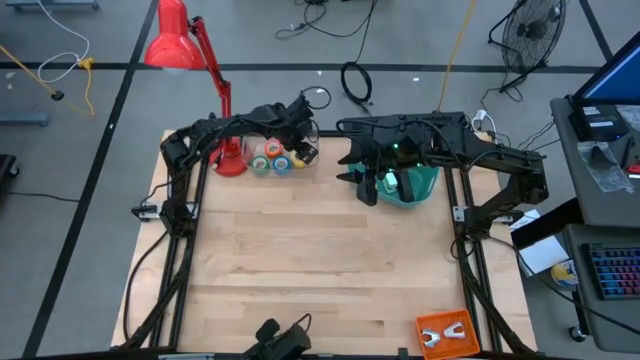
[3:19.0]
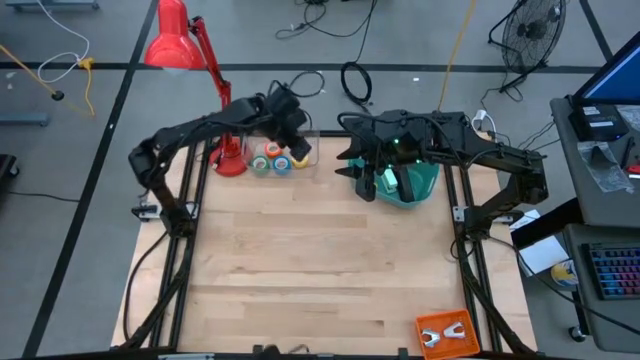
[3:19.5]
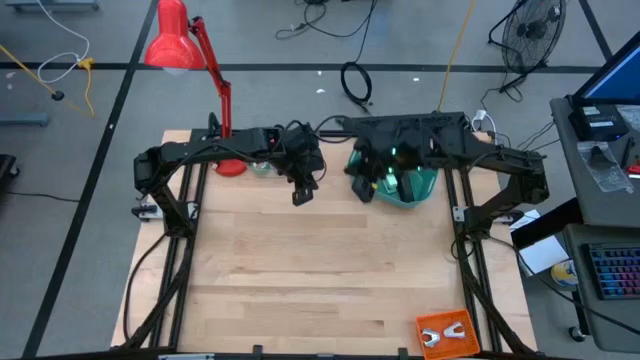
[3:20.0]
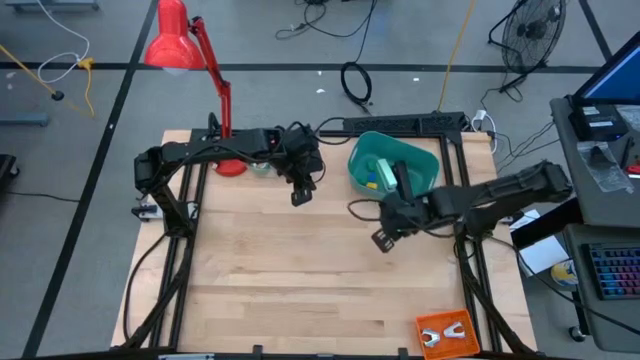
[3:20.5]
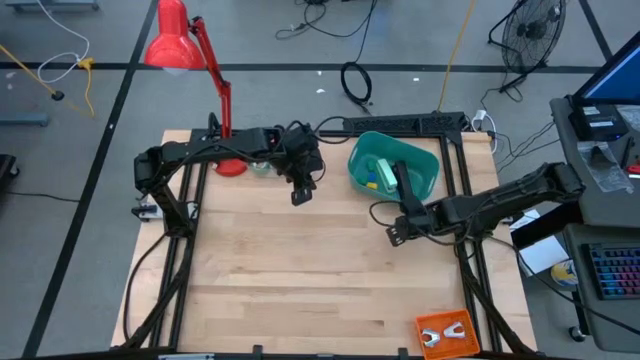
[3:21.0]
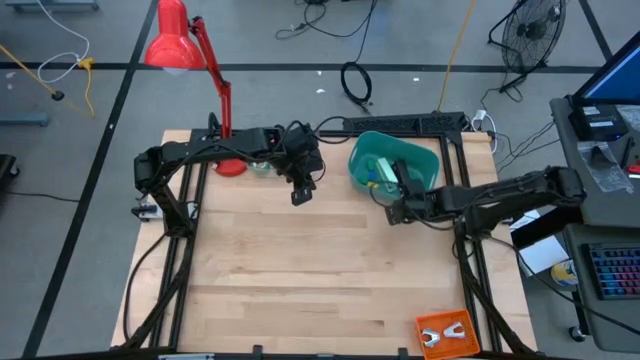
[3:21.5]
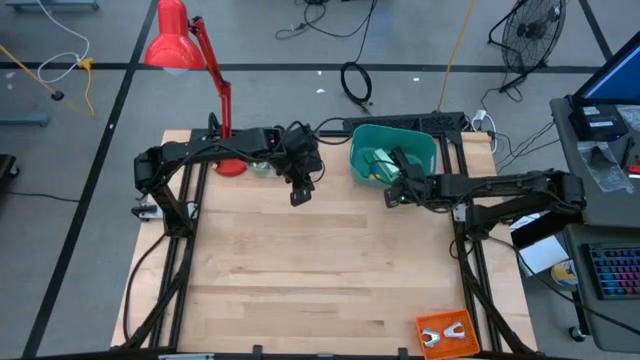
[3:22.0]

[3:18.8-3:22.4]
Task: Pick and place Stapler, Stapler remover, tape
Adjust the green bin

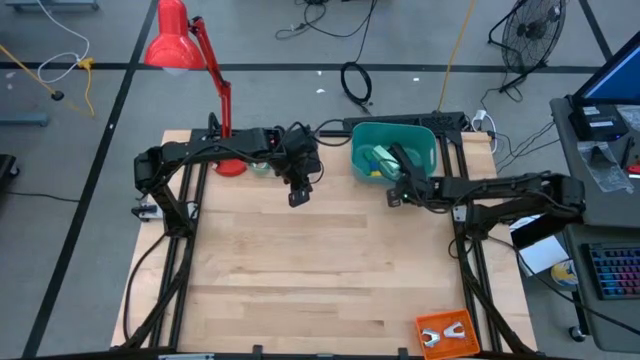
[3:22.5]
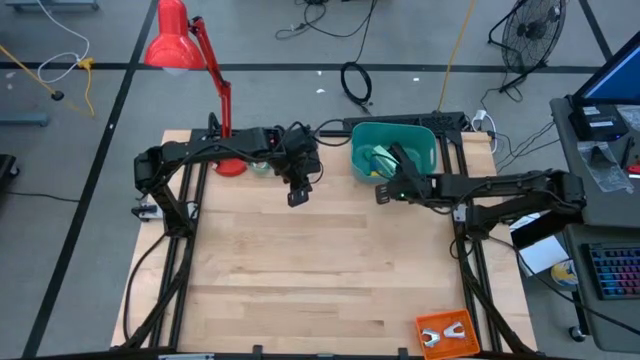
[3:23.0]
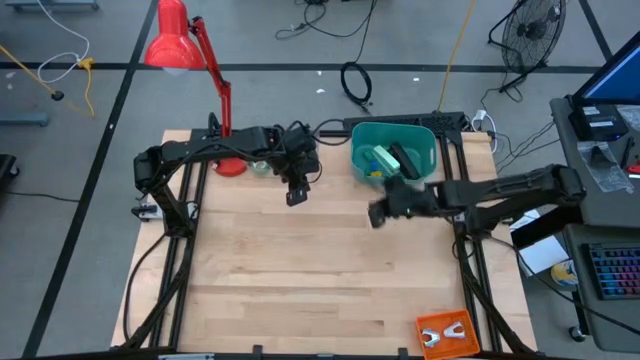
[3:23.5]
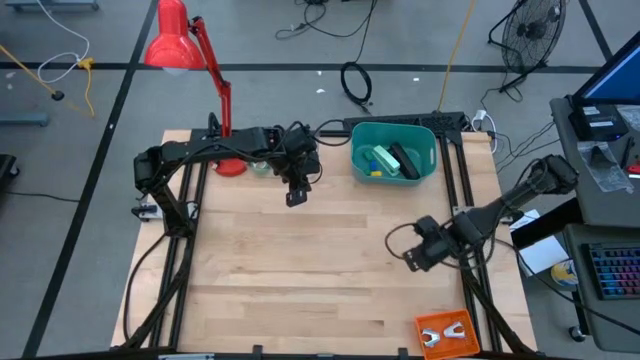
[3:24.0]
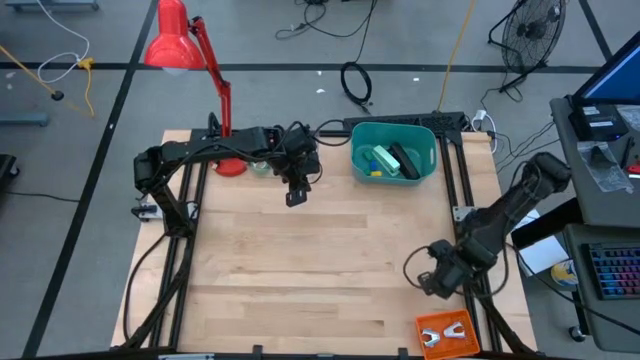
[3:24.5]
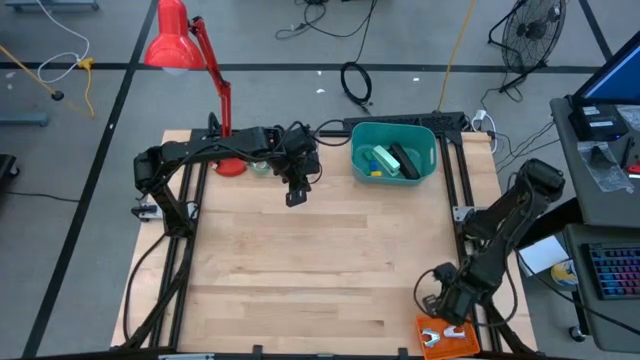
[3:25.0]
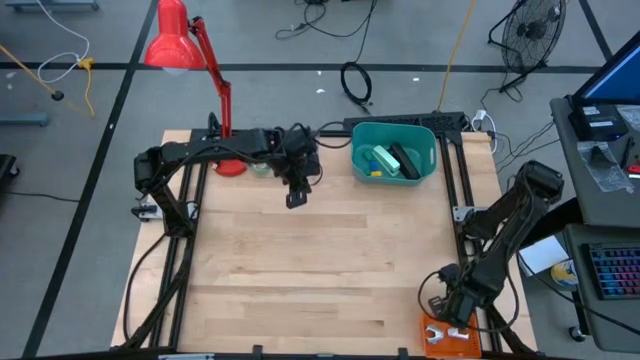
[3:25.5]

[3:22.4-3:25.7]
Adjust the orange bin

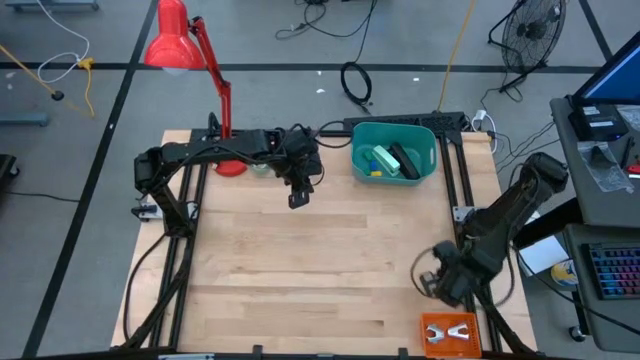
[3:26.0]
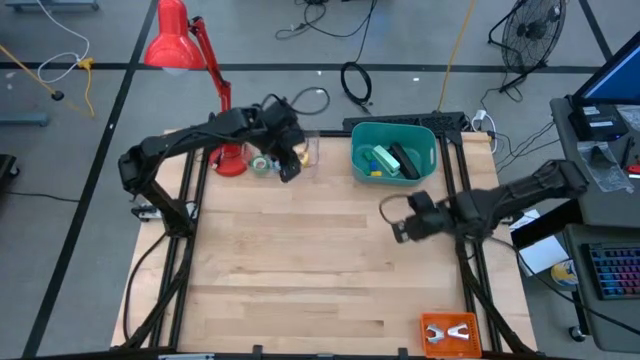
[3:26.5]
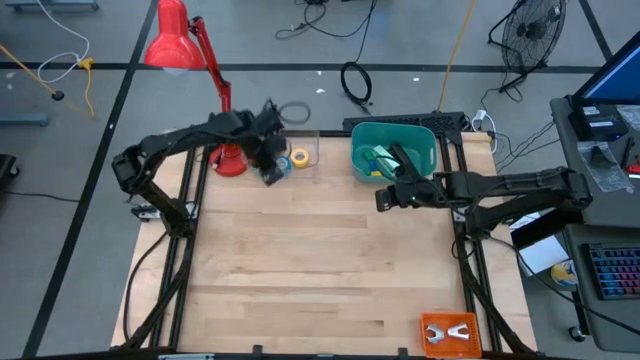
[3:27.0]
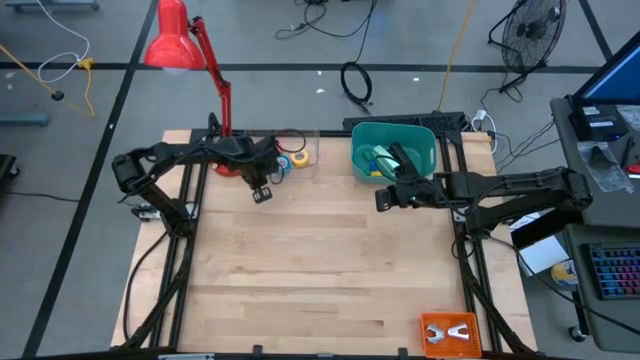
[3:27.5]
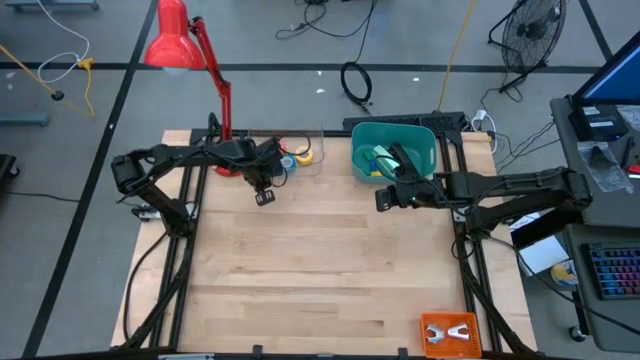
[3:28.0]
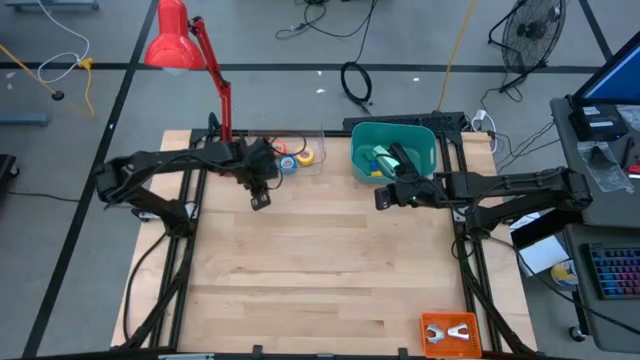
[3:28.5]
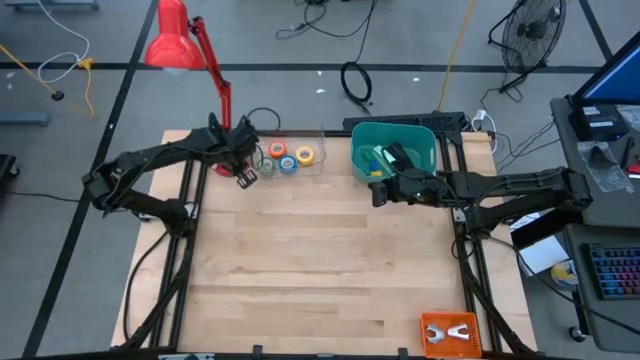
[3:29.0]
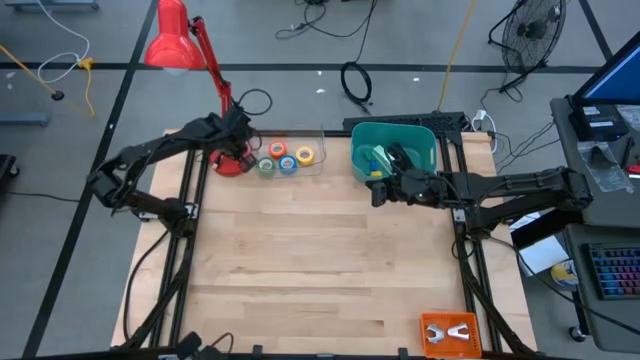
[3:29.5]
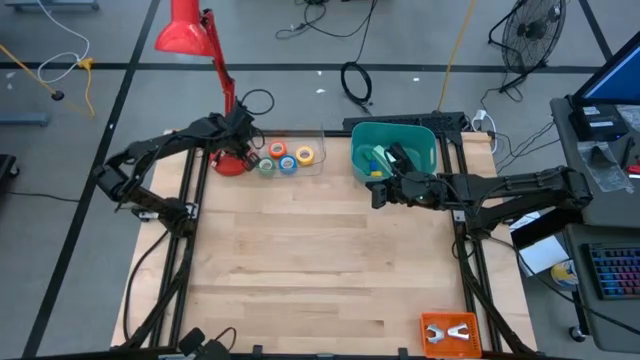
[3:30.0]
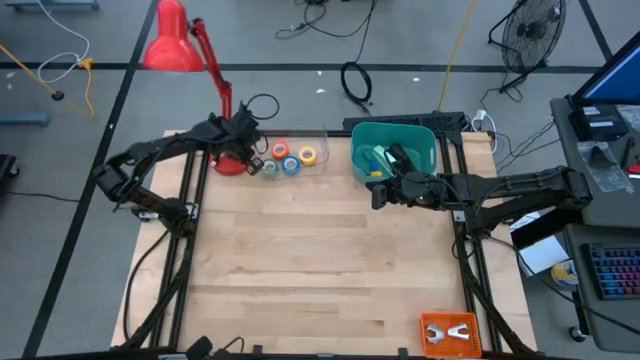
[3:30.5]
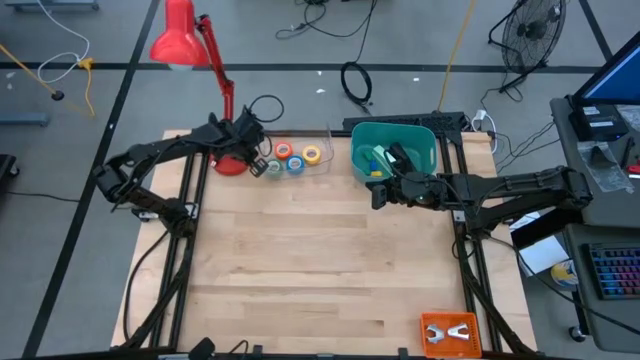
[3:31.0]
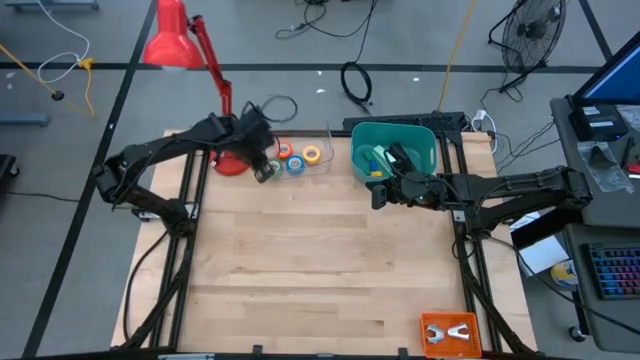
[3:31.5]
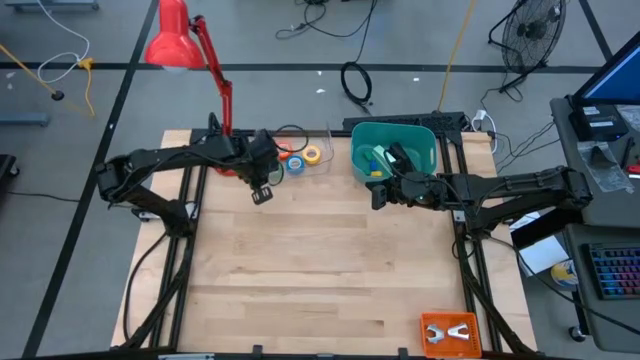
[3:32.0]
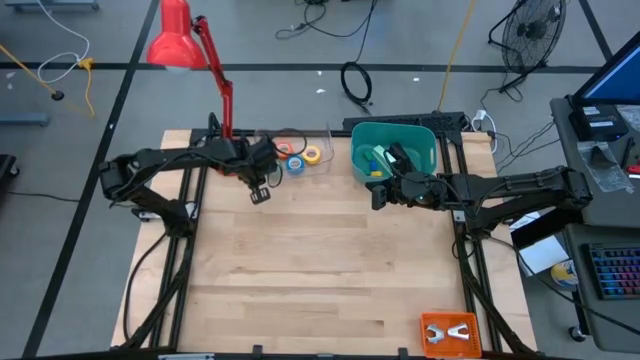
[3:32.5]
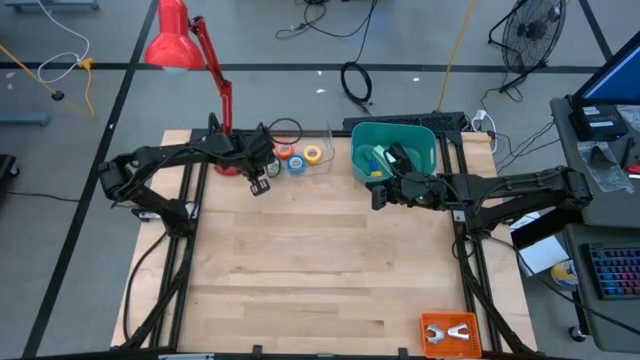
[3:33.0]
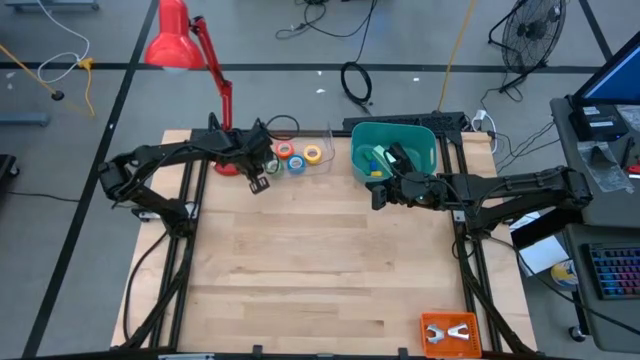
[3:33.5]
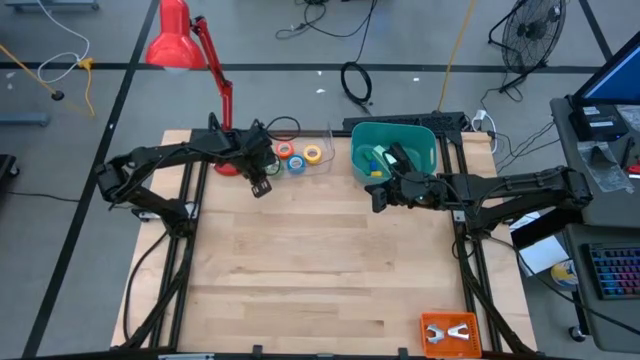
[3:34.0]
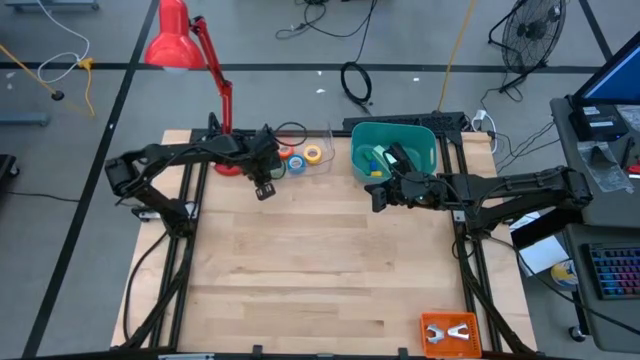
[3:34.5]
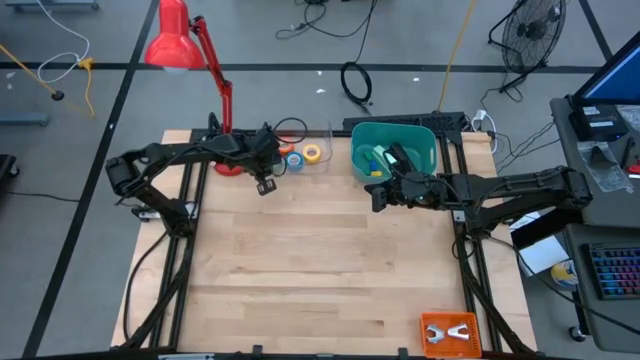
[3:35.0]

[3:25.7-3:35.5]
Adjust the transparent bin

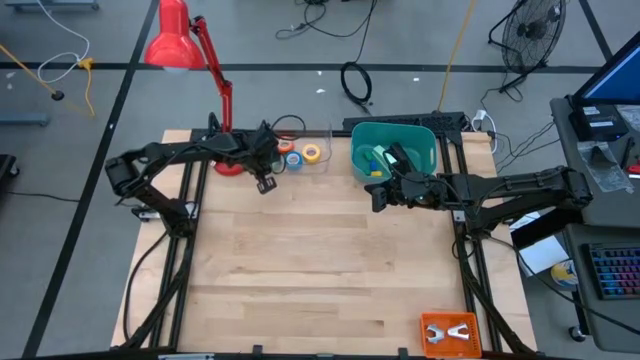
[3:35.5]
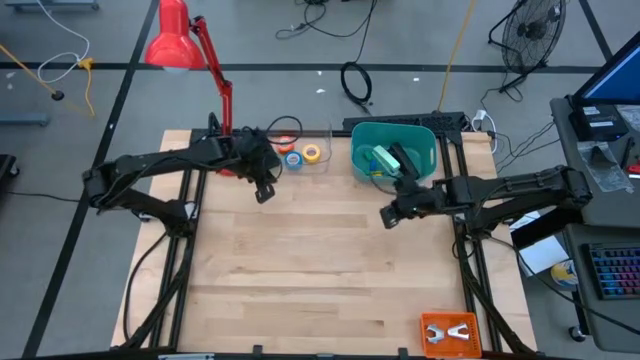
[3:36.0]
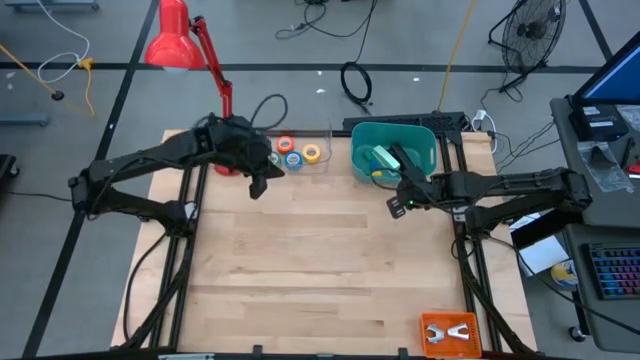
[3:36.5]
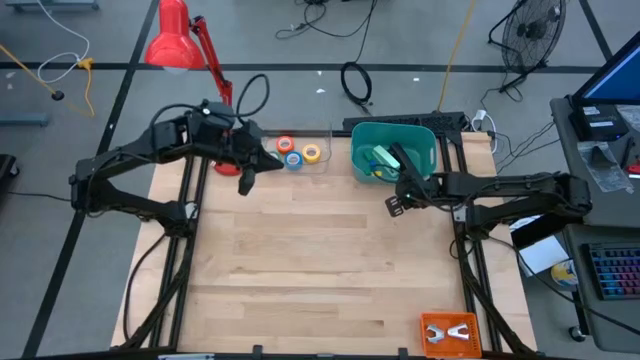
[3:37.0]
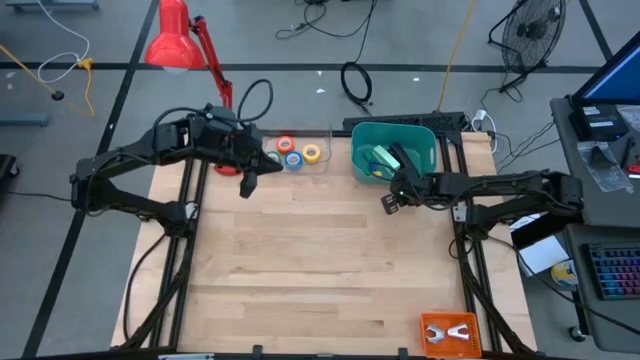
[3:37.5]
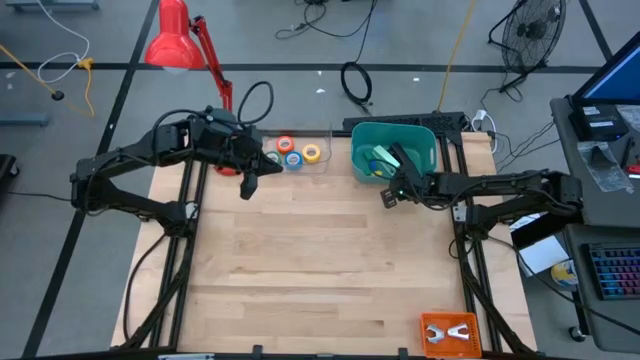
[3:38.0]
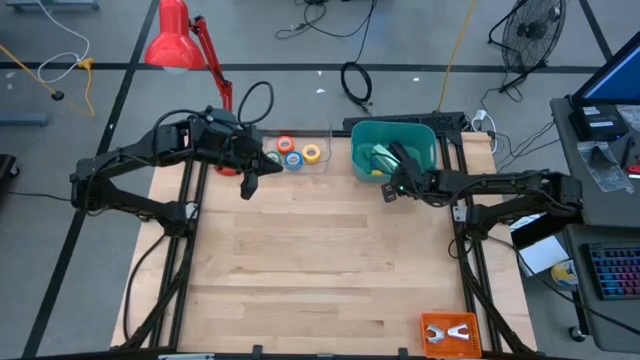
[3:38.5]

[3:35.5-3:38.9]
Adjust the green bin

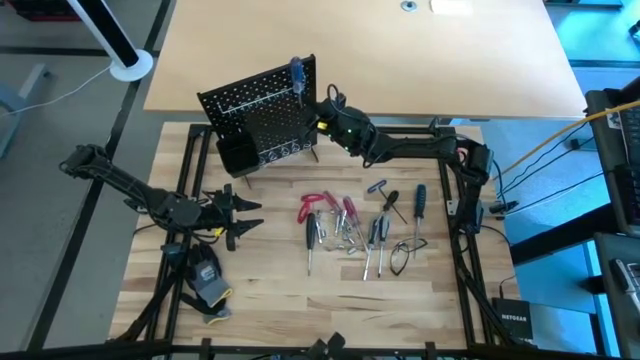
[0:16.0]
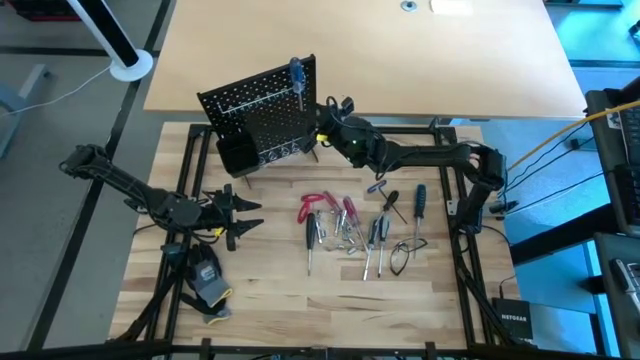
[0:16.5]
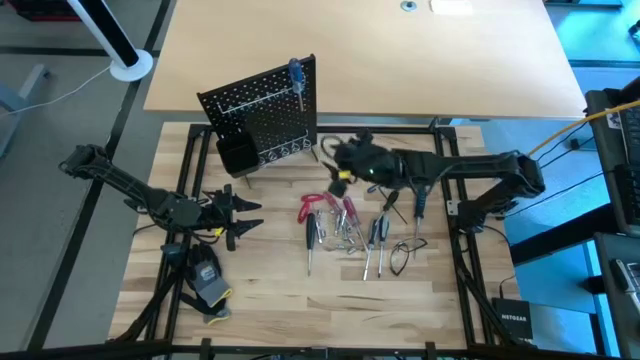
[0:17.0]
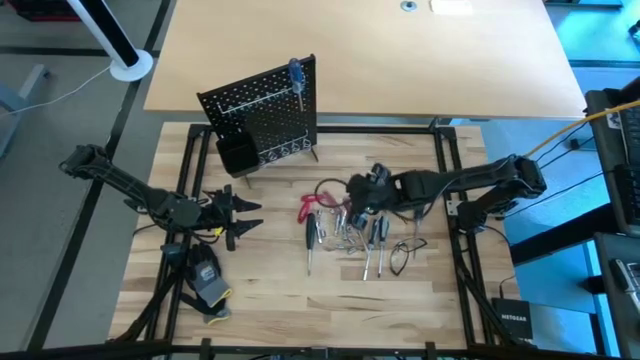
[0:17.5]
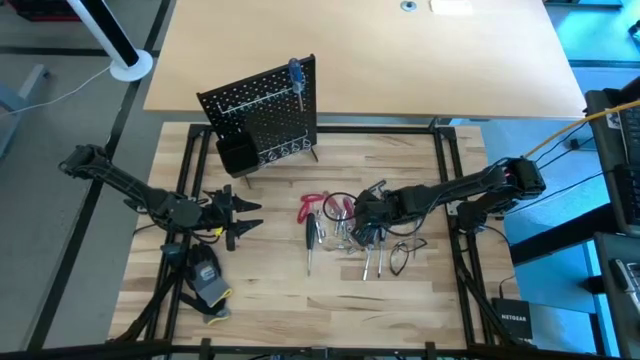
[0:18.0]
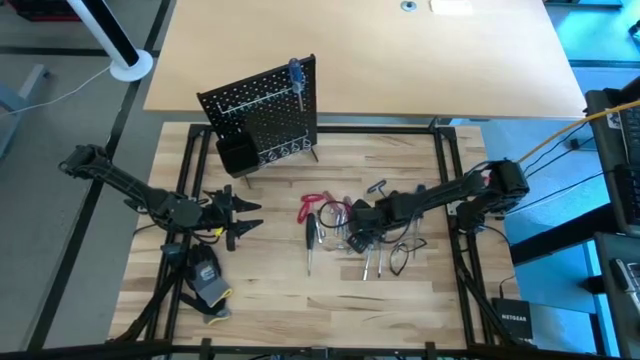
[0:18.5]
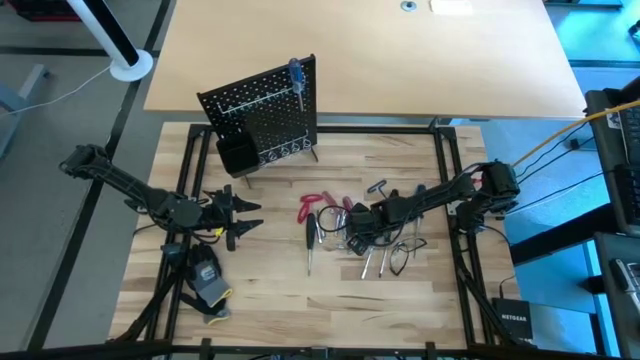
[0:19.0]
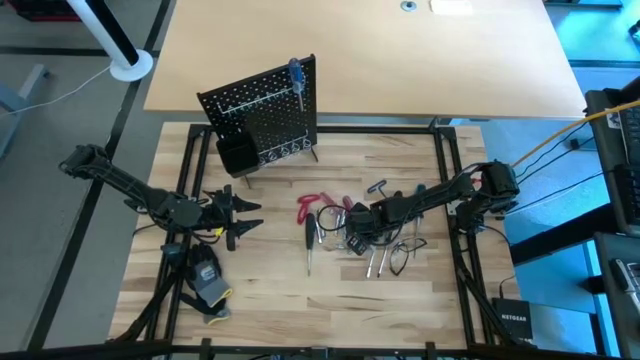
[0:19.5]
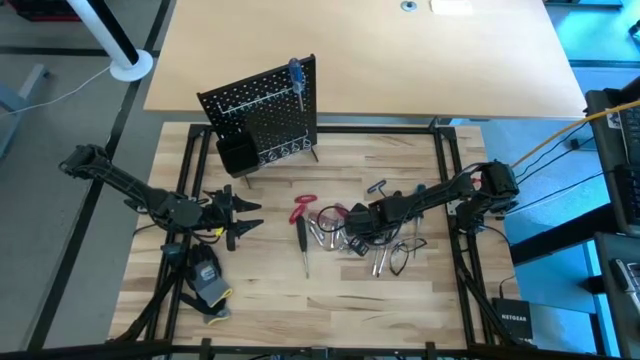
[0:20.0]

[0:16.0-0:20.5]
Task: Hang tools onto peg board
Hang the red screwdriver onto the peg board
